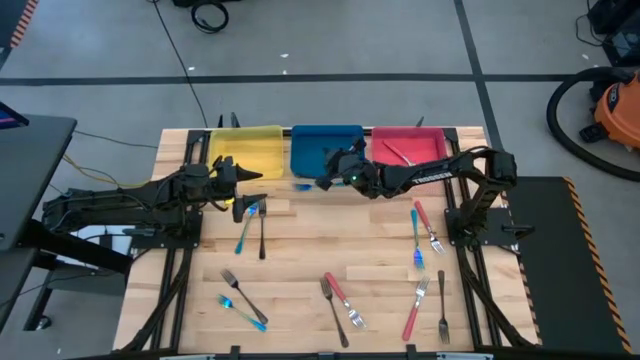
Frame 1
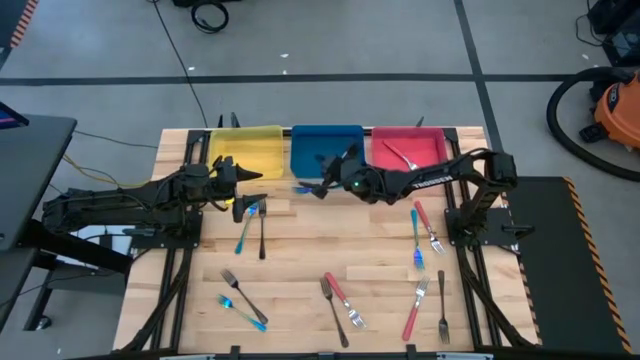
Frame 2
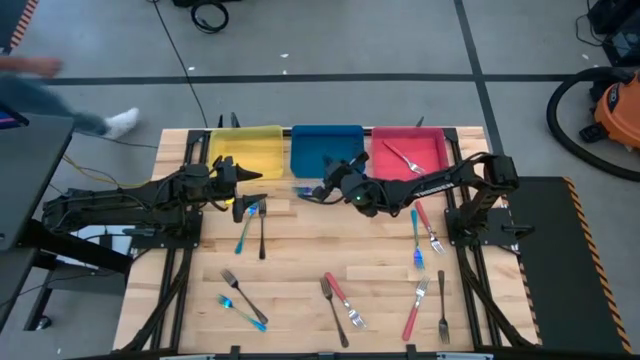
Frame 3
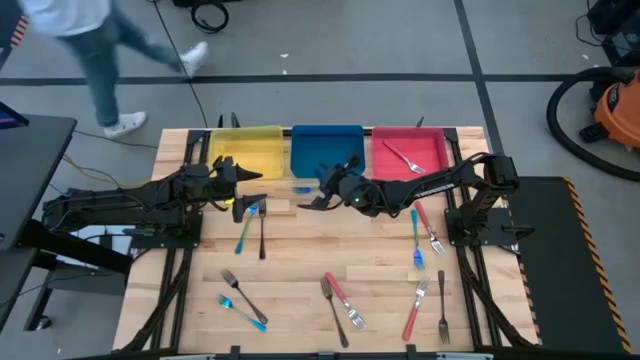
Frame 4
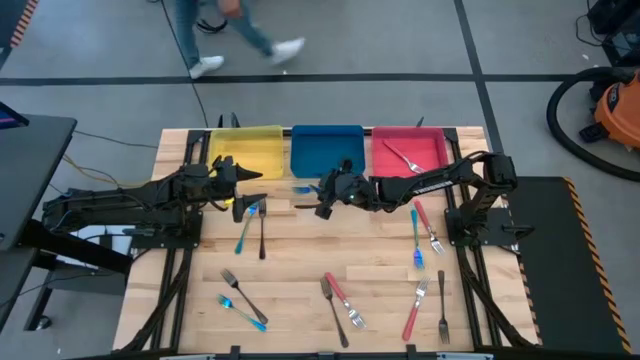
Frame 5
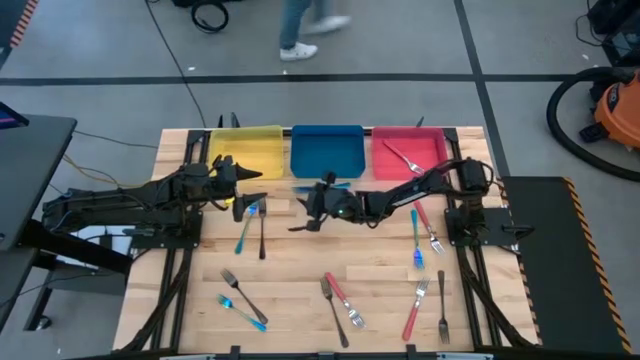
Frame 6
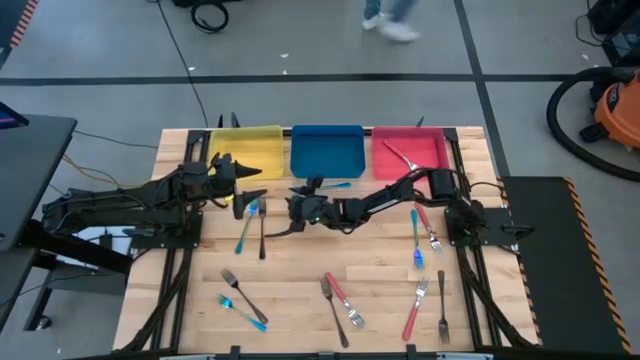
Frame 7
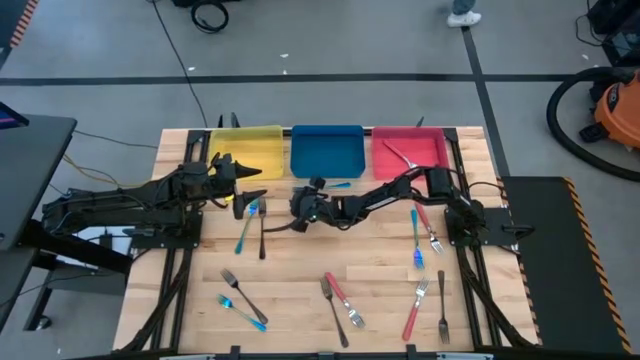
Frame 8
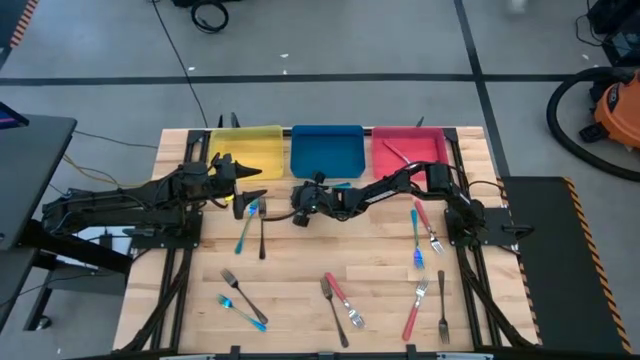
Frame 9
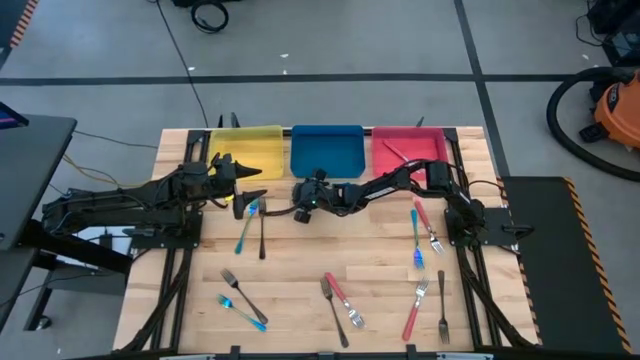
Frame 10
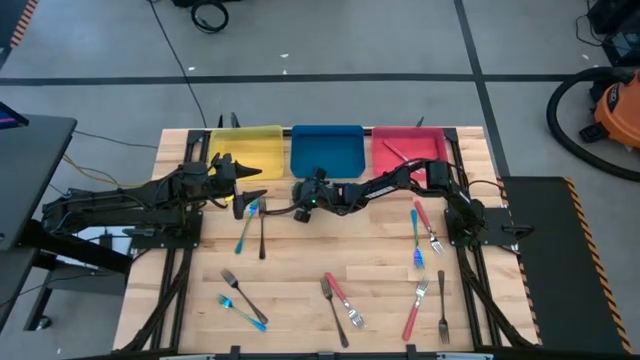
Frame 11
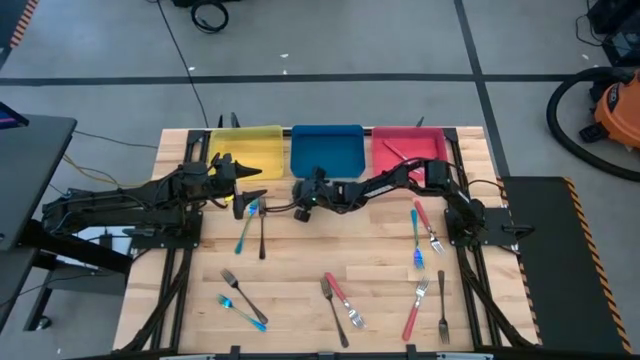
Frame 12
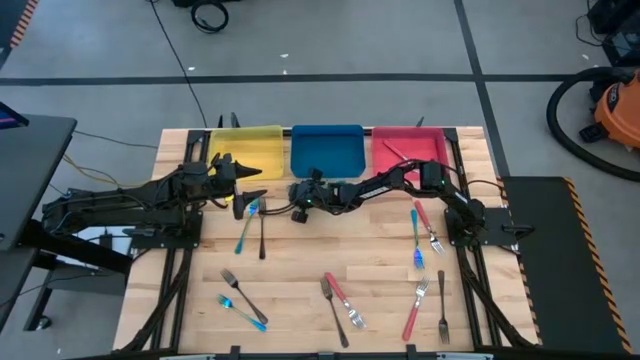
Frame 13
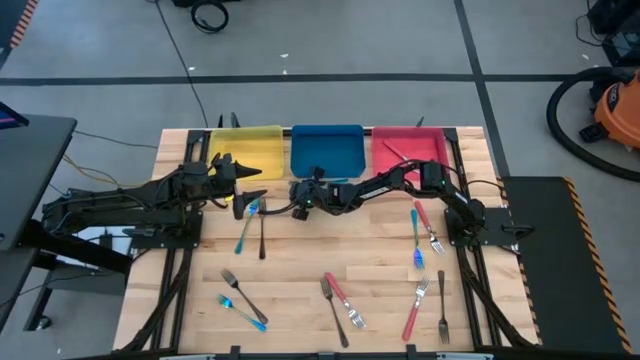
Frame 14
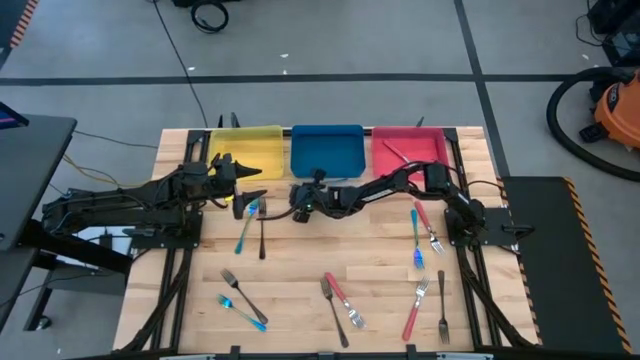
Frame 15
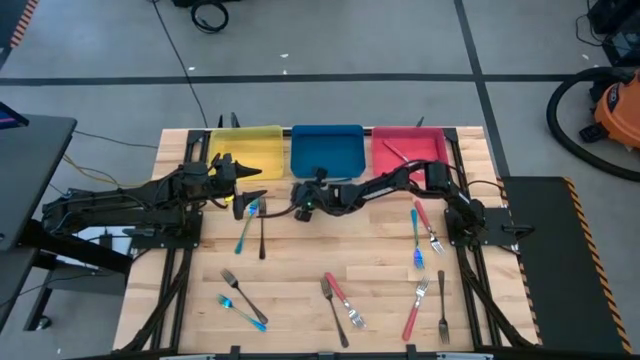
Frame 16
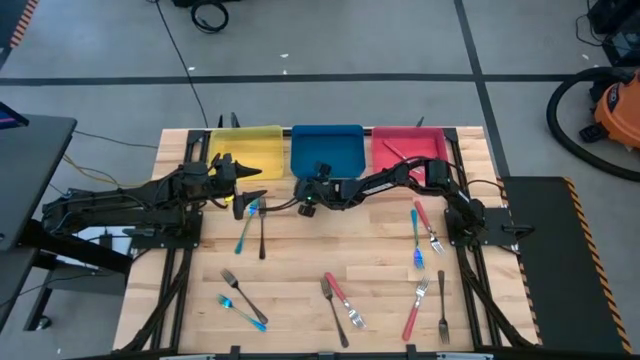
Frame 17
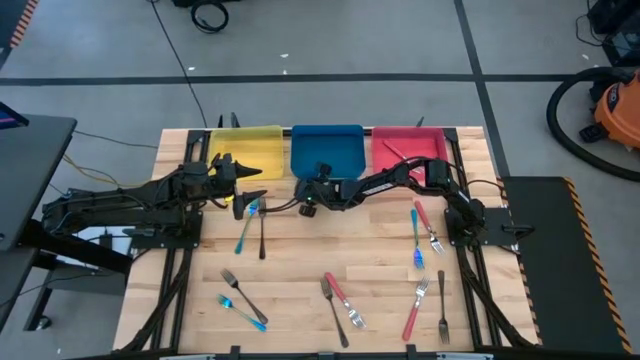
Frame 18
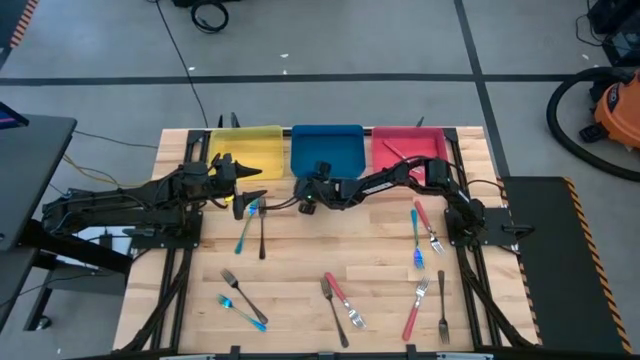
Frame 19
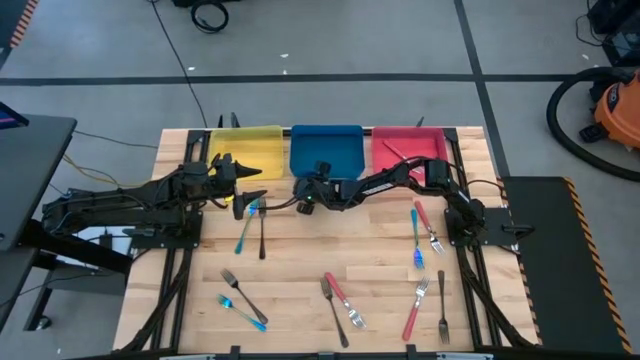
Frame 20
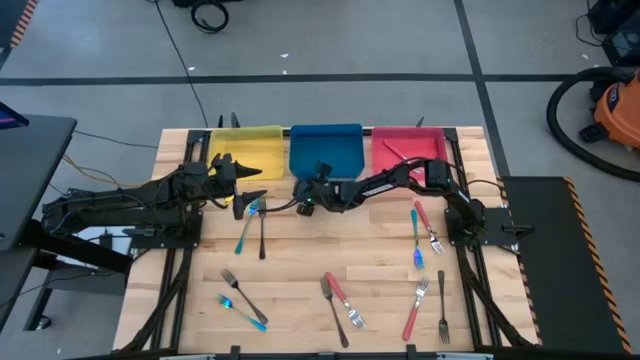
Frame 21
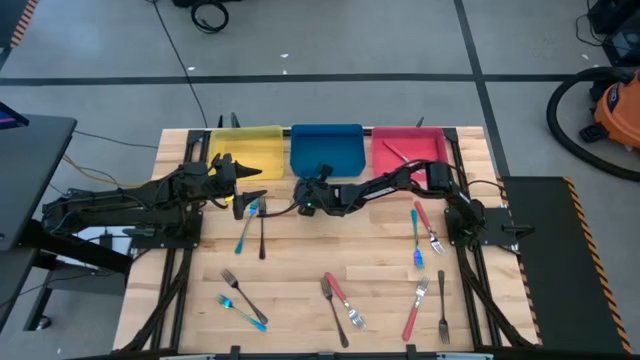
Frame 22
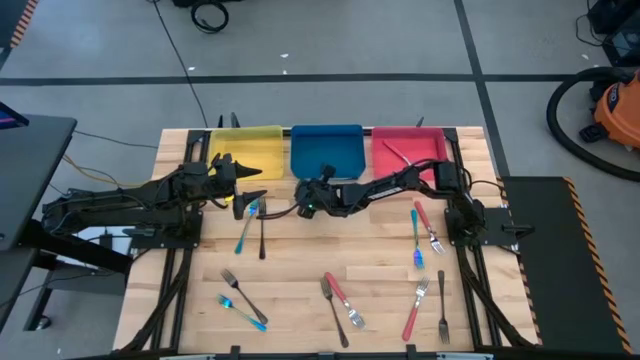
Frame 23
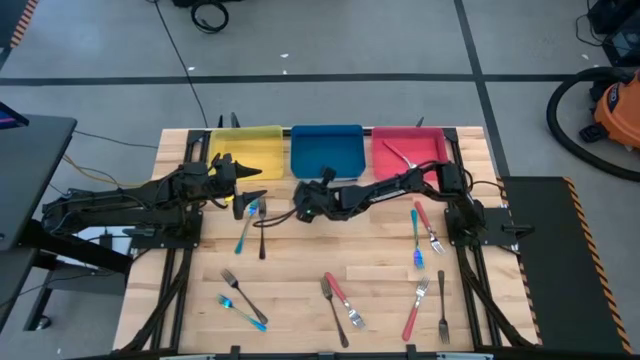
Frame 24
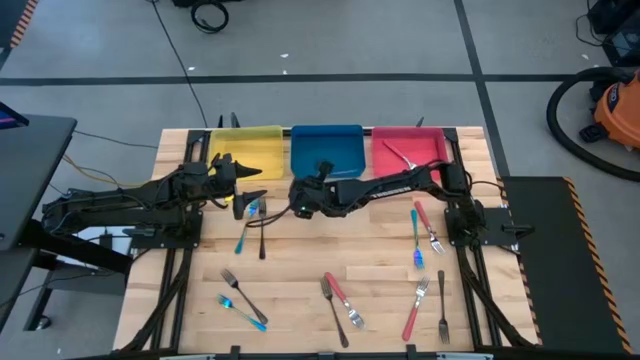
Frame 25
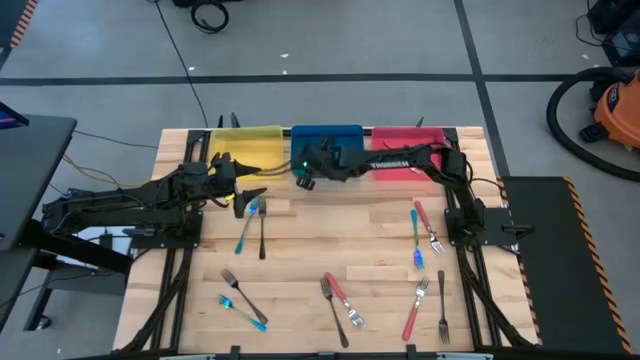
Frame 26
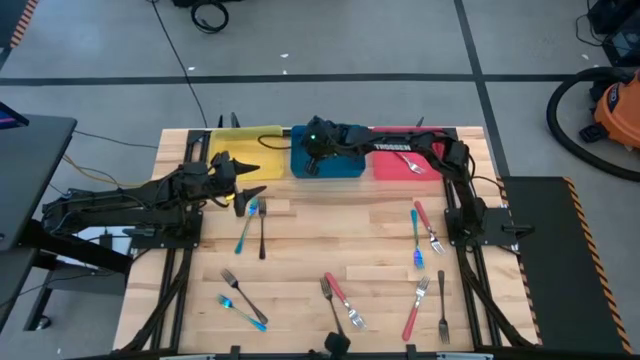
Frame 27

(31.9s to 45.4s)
Task: Sort silverware by color (type)
Put the middle top blue fork into the blue bin
